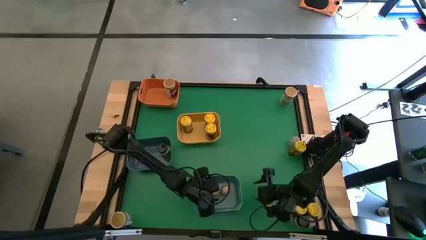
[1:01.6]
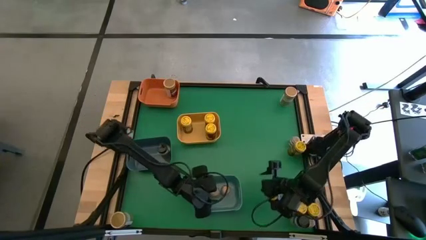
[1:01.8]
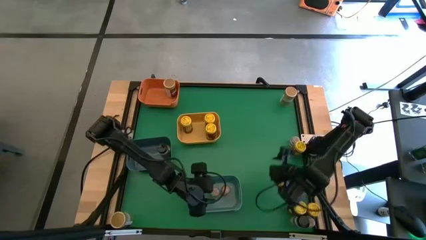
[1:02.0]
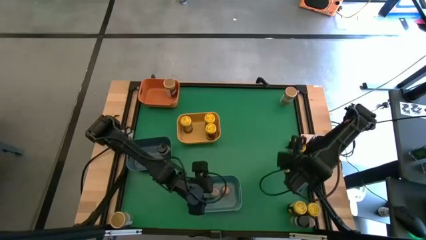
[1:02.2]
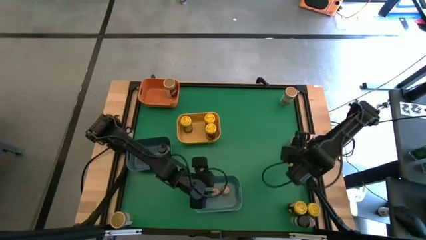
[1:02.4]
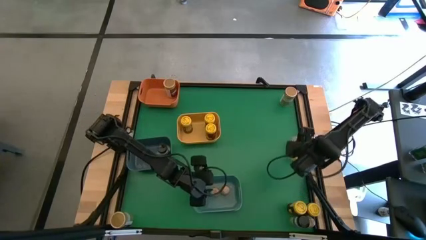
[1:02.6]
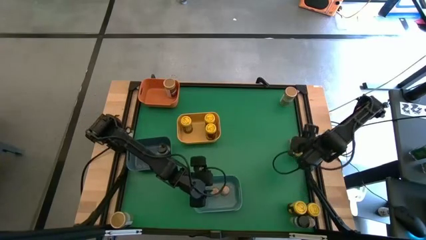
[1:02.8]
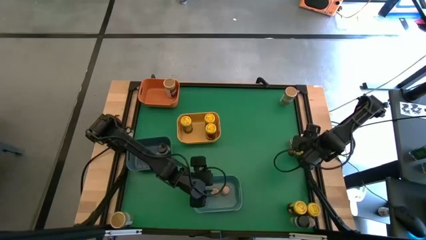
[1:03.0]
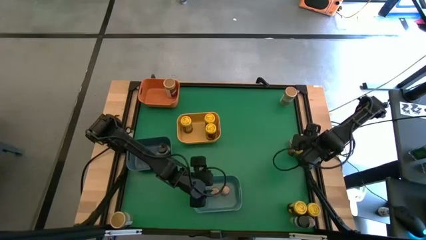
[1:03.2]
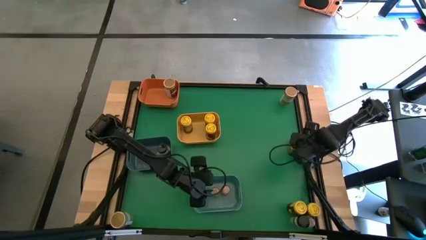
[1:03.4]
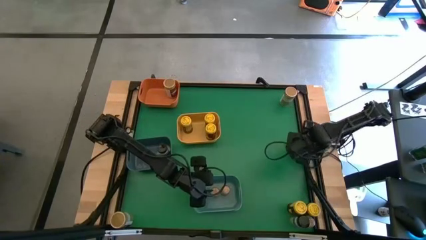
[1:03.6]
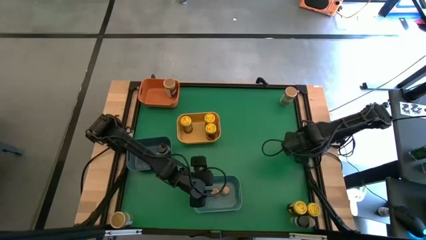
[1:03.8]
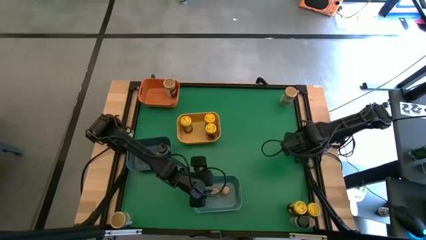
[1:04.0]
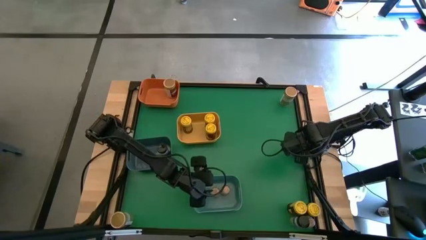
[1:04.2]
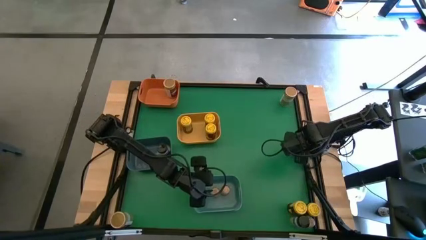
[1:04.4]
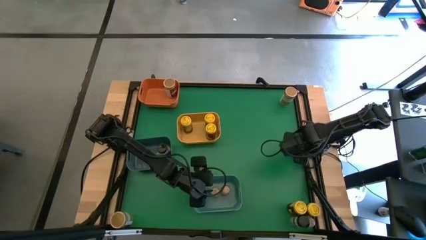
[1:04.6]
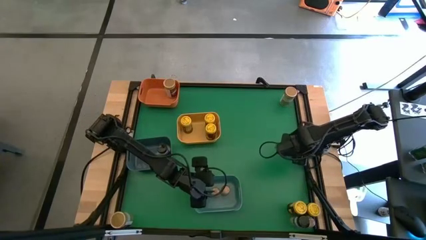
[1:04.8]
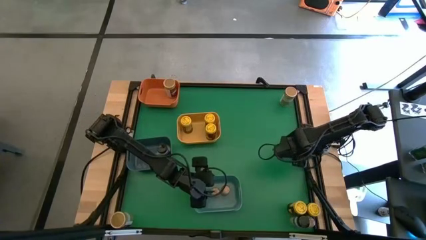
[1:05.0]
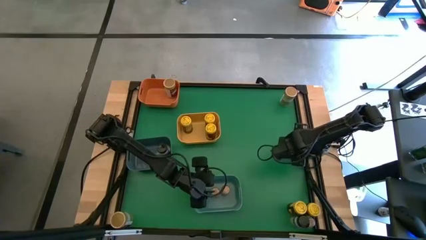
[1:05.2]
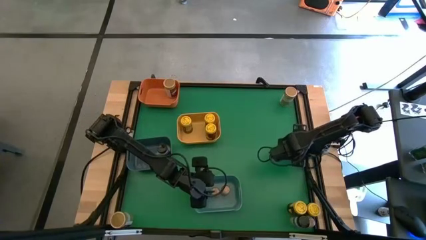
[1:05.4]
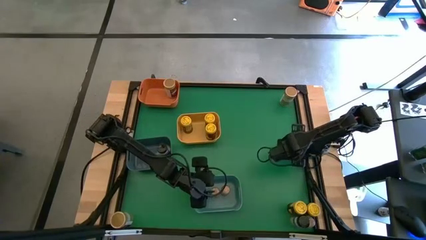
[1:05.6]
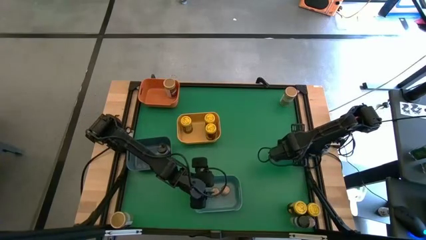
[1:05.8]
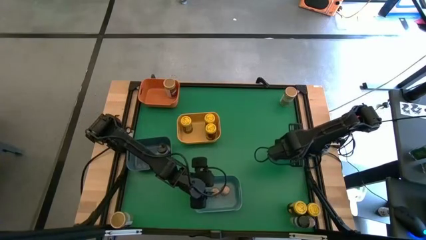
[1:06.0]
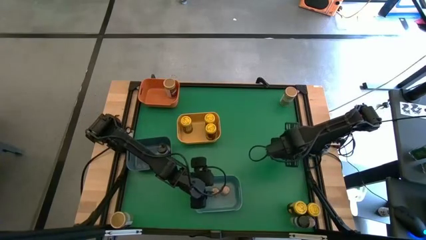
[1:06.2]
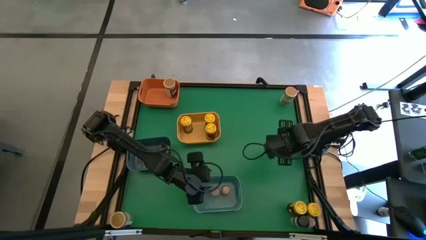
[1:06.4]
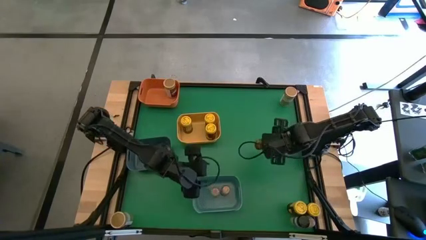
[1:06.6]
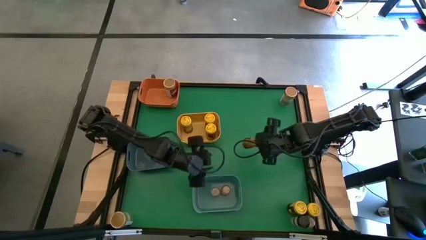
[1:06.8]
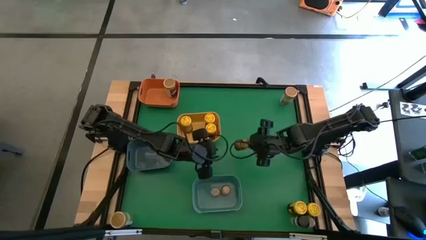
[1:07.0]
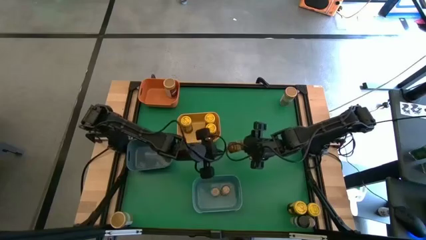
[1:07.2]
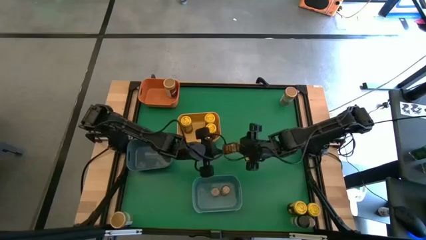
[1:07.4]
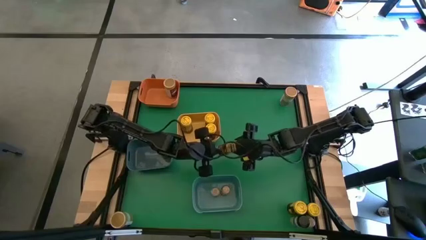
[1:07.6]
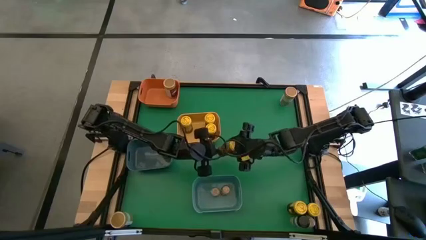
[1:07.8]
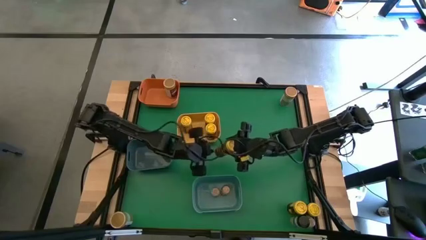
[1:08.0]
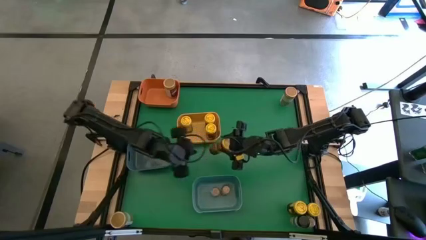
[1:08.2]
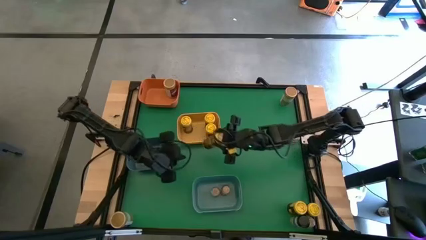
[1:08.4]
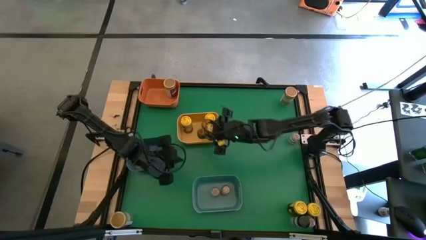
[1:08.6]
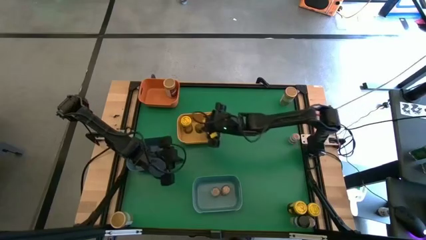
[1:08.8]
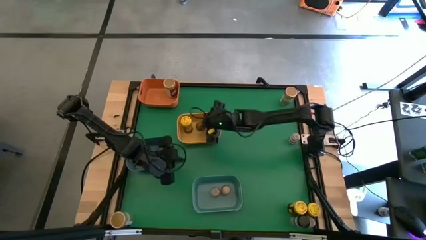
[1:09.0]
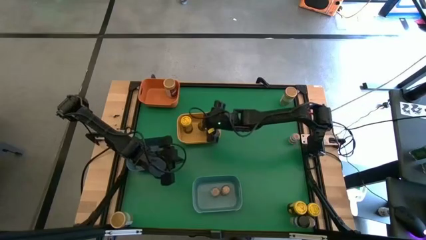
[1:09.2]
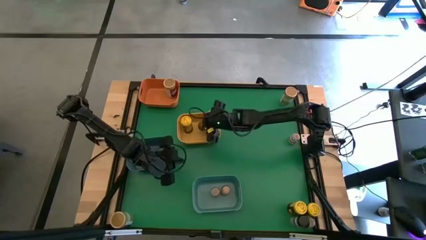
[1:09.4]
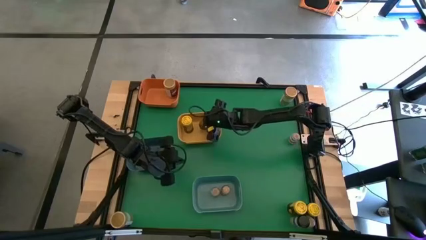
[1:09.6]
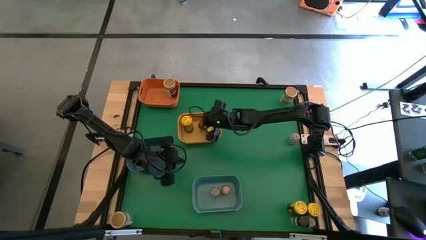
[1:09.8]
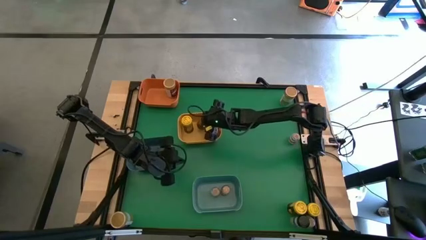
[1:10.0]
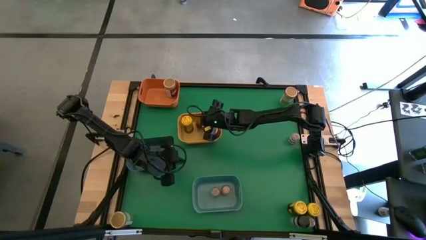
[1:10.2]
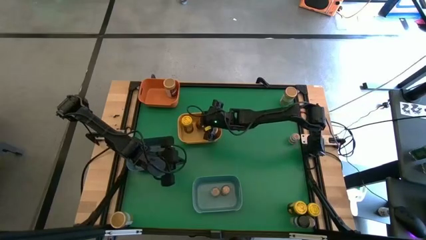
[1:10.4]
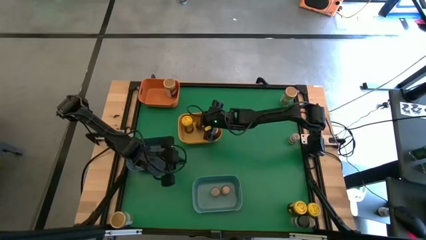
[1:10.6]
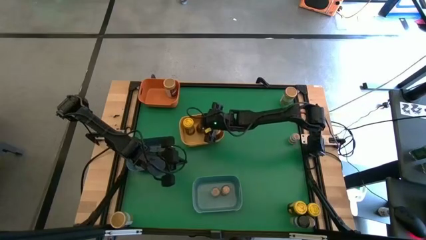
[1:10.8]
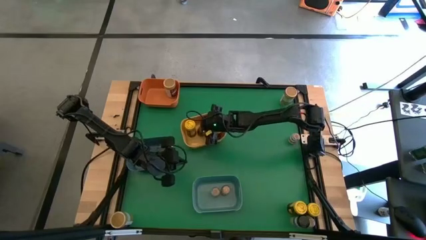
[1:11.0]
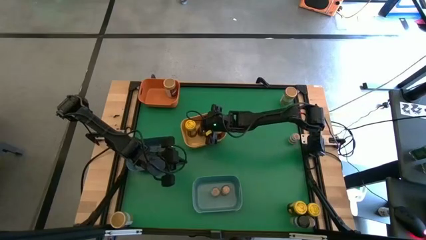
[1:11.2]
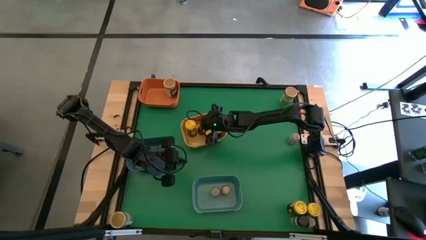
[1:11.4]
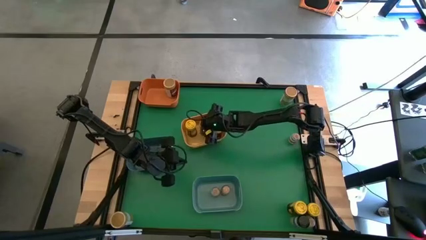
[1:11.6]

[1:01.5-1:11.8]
Task: Sort spices by type
Put the yellow seasoning bottle into the yellow bin

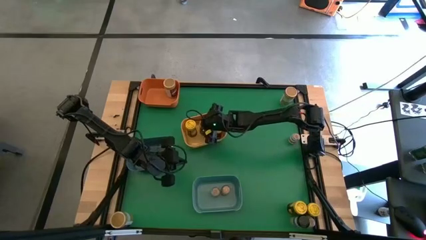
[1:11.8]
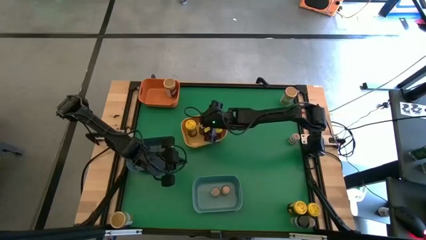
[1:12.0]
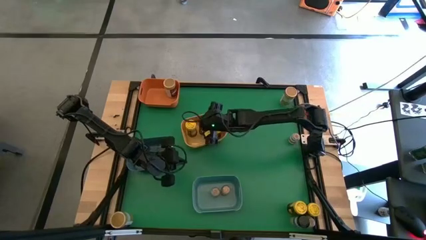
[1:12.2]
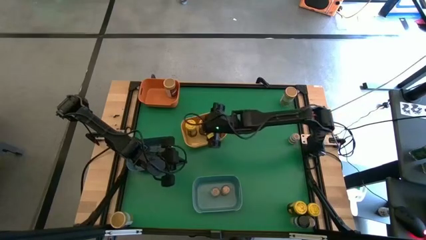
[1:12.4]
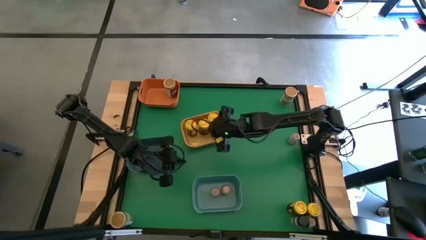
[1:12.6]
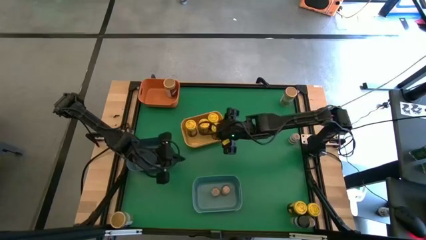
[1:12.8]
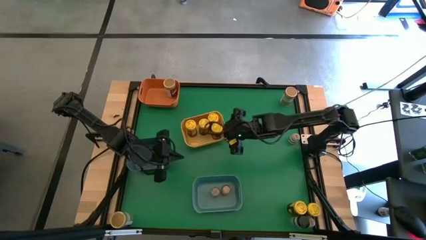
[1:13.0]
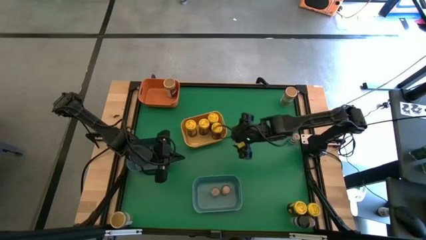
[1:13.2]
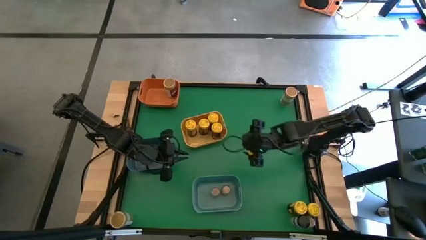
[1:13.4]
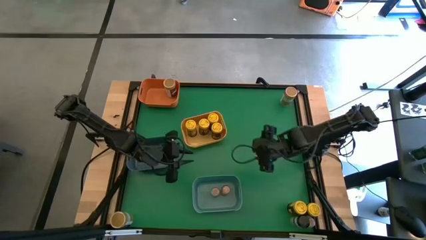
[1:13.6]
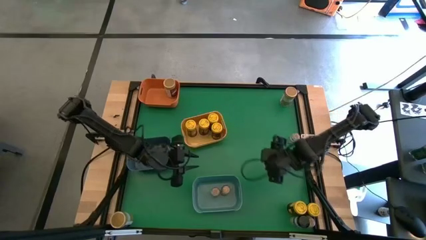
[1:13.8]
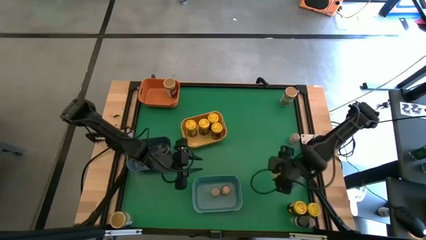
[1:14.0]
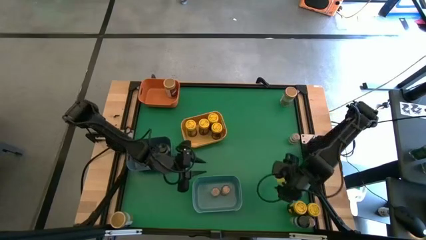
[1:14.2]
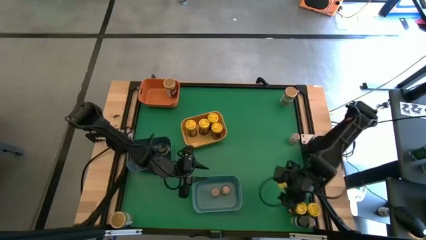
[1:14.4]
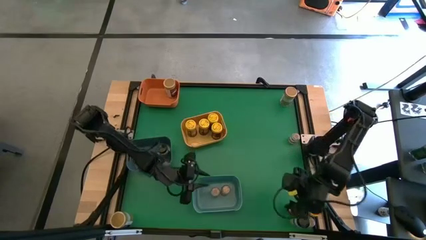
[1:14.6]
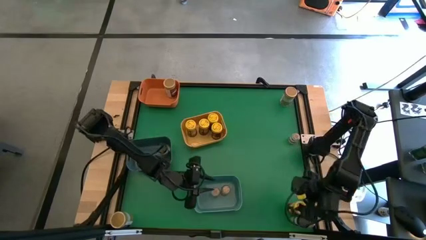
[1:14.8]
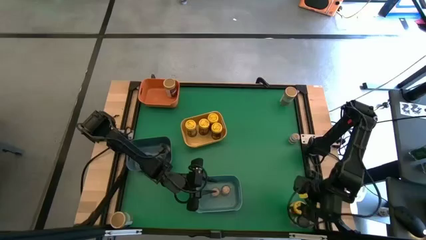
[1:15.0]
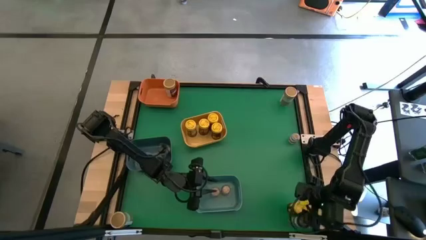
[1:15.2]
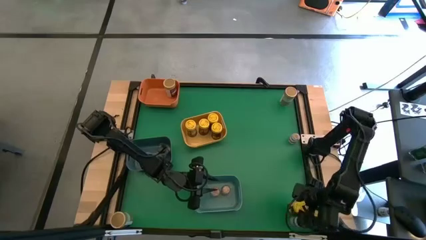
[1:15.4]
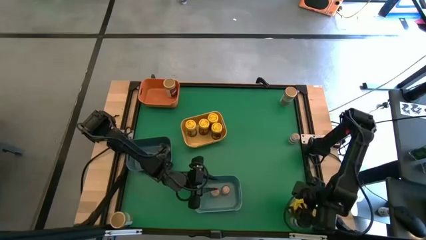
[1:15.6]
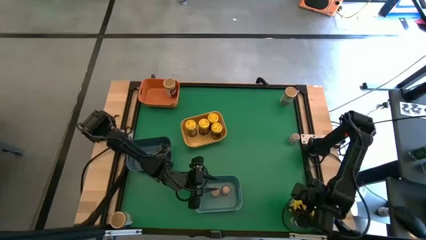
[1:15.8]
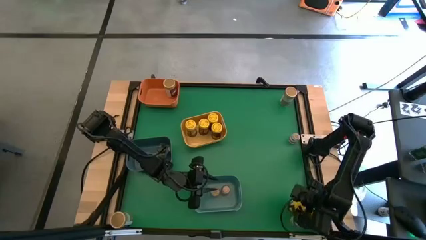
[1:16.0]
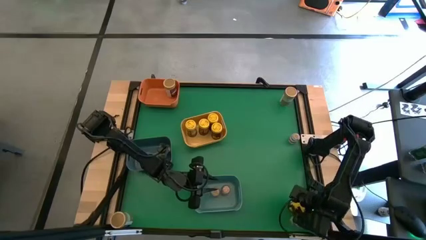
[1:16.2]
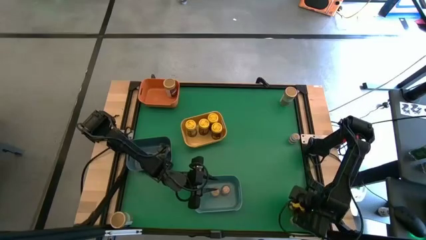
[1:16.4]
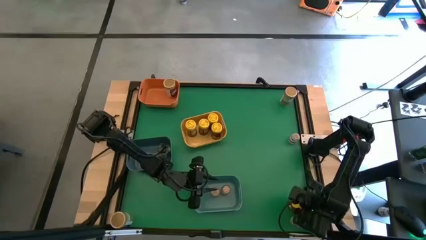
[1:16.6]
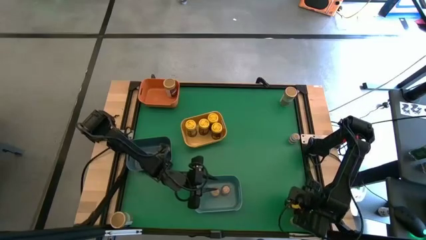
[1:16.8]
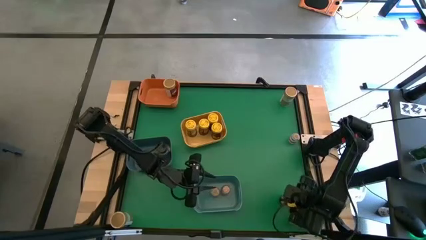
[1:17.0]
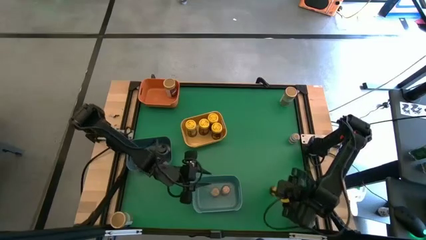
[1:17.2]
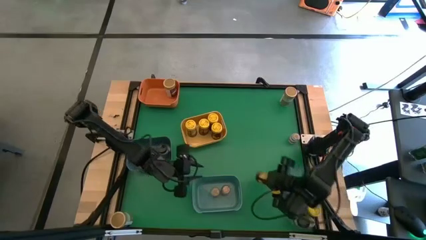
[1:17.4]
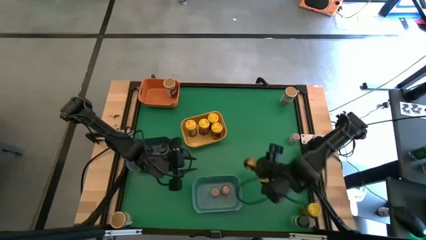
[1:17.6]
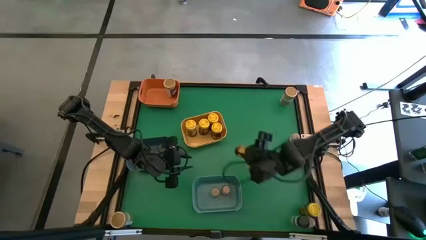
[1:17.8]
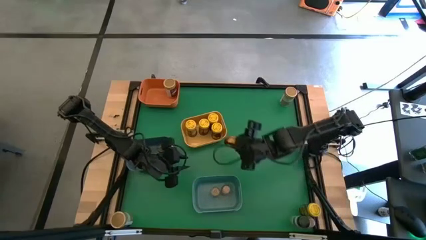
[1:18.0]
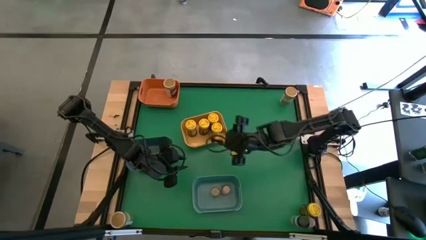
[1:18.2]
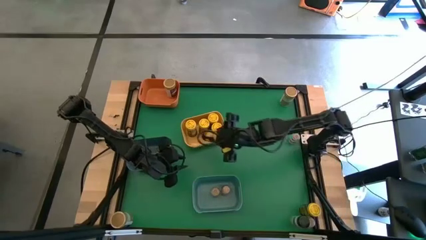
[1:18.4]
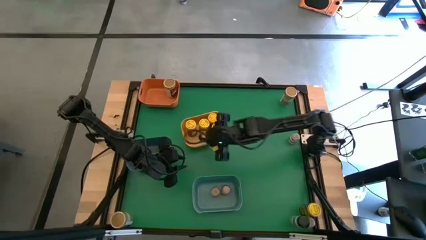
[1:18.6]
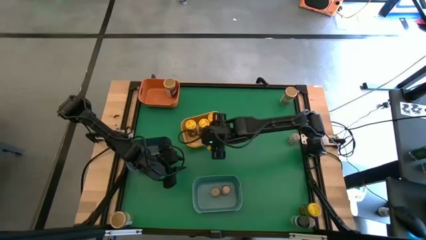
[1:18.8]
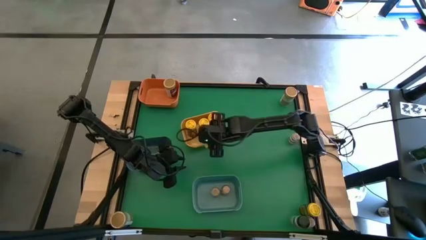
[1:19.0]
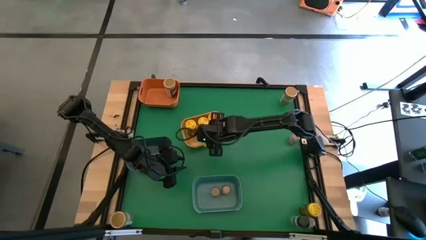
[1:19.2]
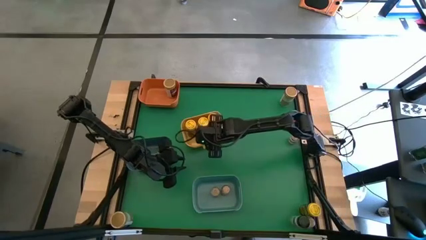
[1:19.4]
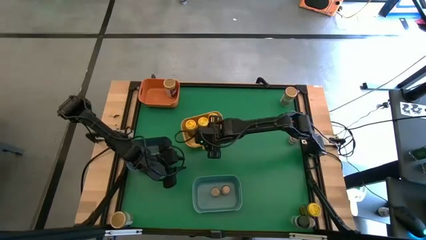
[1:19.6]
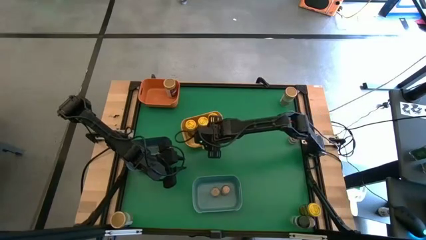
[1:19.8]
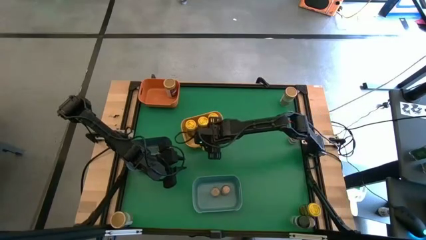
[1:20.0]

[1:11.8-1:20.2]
Put the yellow seasoning bottle into the yellow bin
